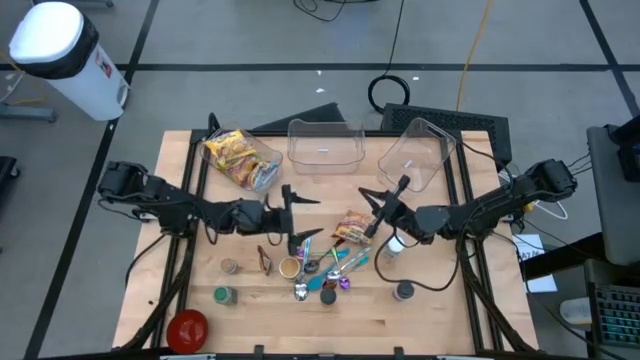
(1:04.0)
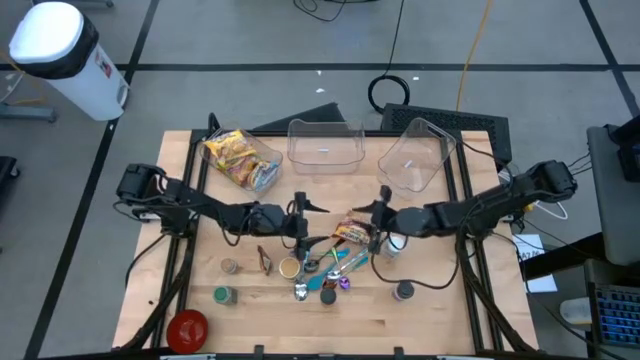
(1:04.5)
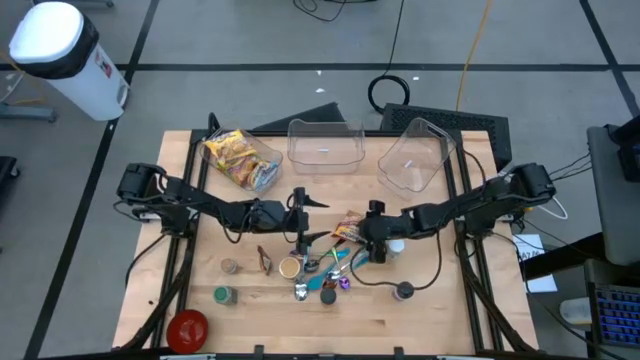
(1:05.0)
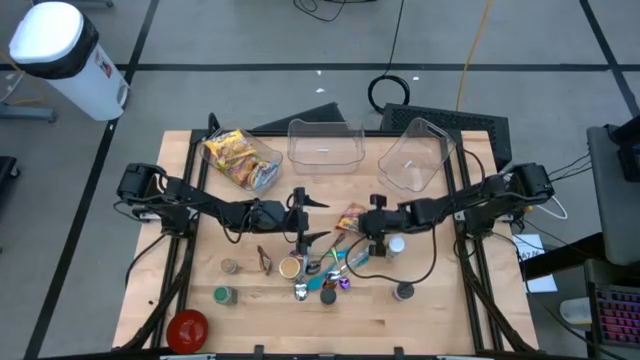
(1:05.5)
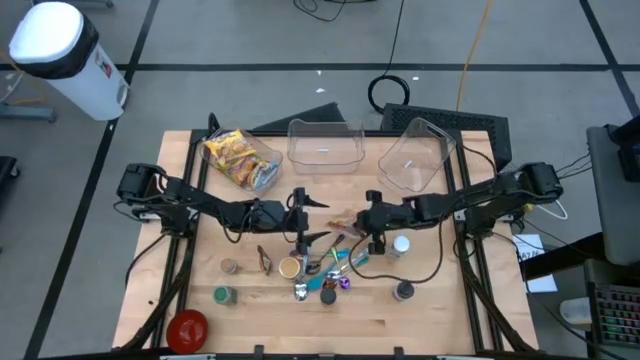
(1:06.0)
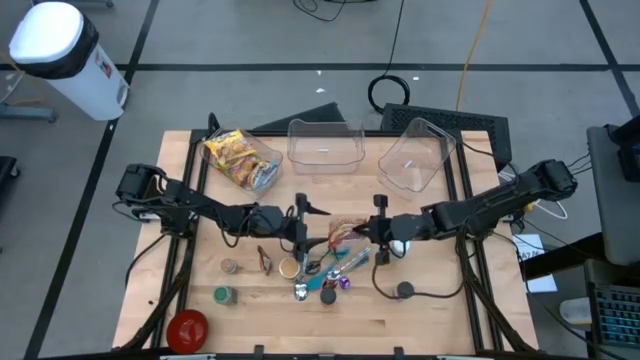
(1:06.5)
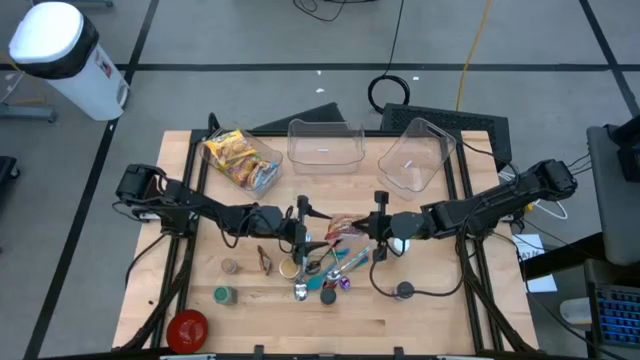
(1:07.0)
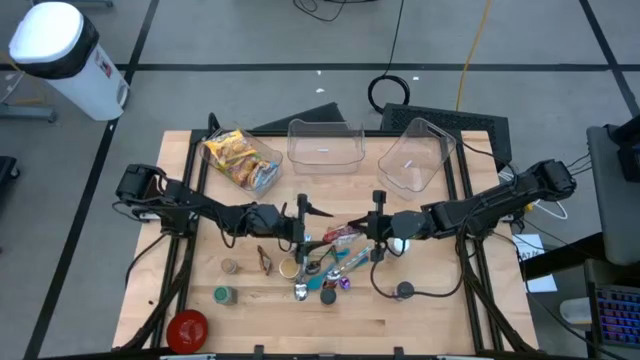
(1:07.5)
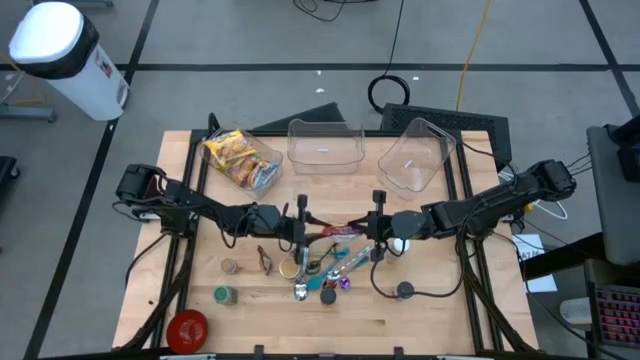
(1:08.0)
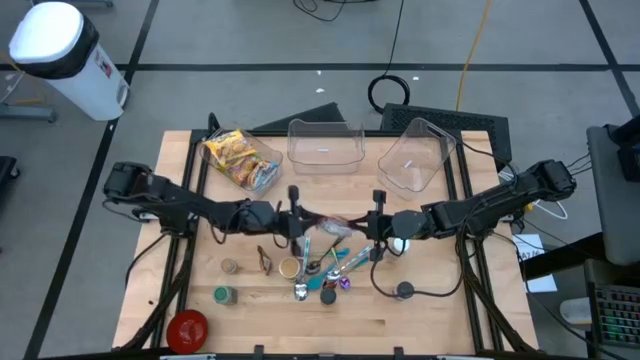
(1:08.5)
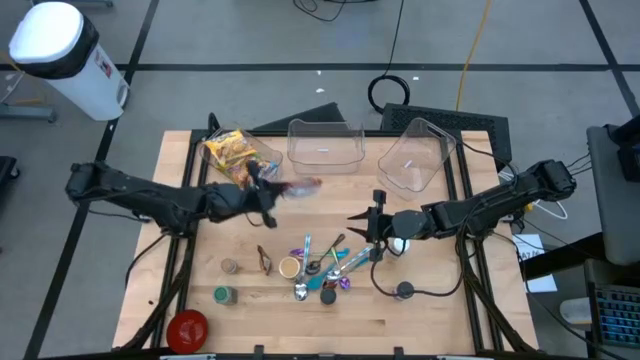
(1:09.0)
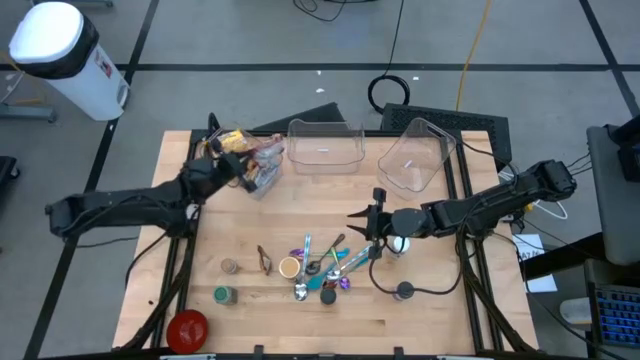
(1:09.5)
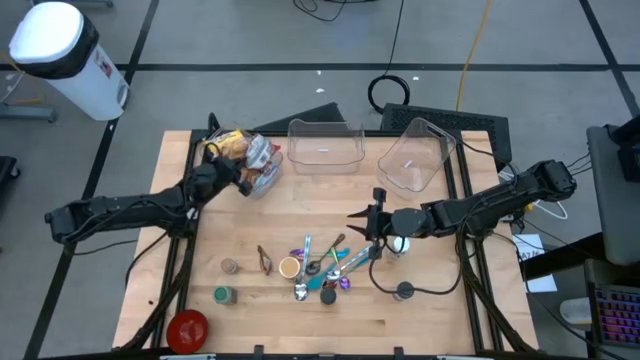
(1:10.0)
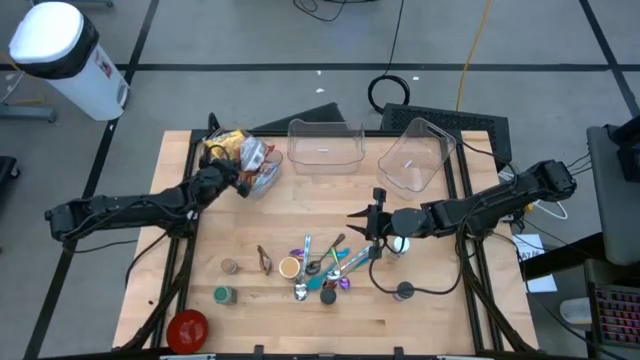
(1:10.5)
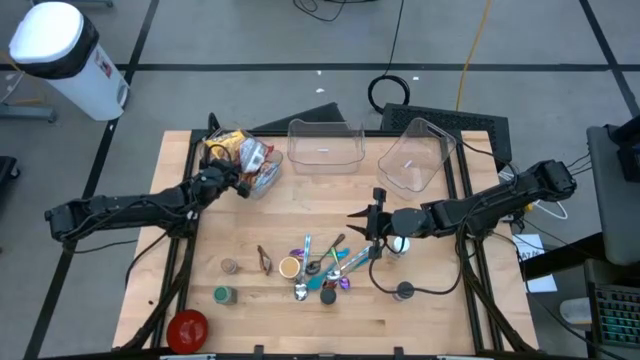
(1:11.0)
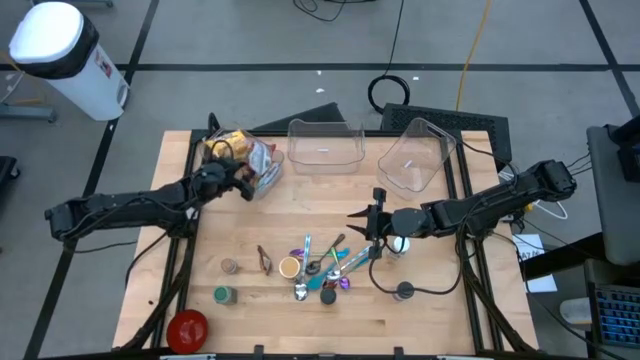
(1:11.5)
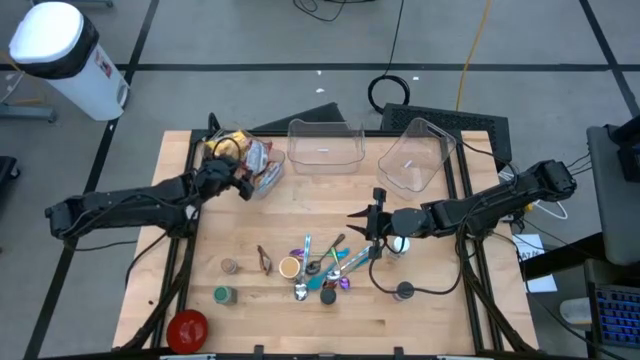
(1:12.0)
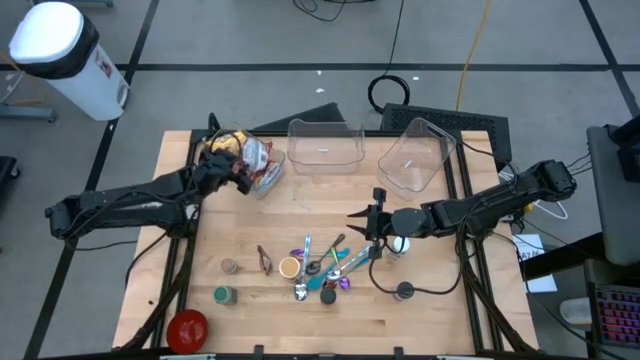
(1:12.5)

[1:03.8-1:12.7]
Task: Pick & Place Food Item
Put the red noodle pack into the left transparent bin

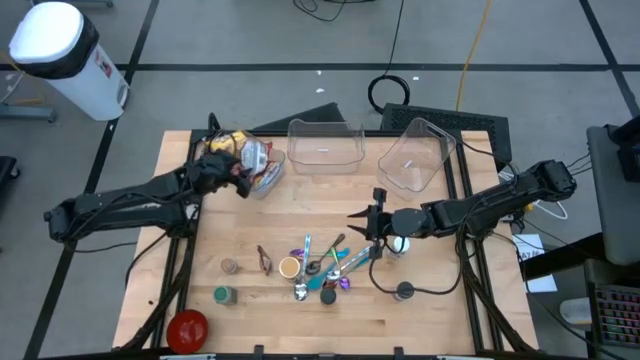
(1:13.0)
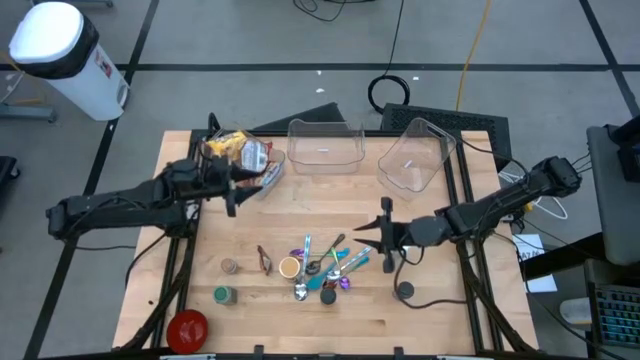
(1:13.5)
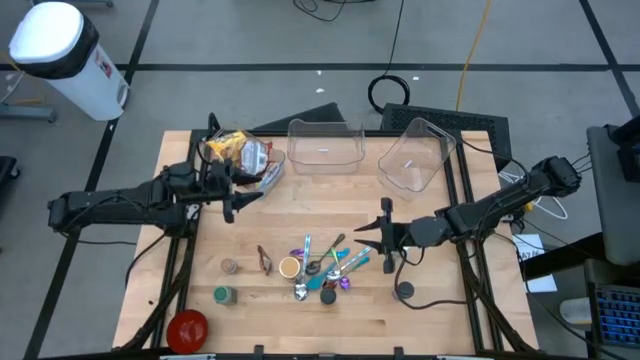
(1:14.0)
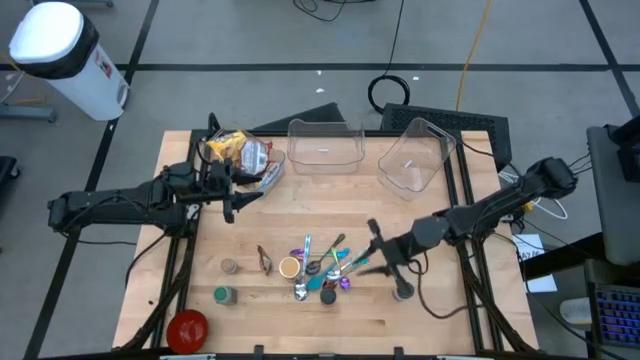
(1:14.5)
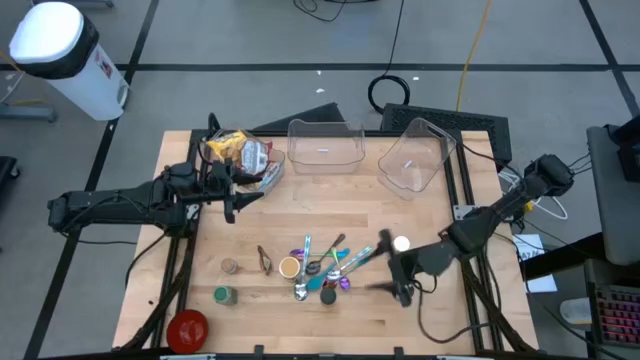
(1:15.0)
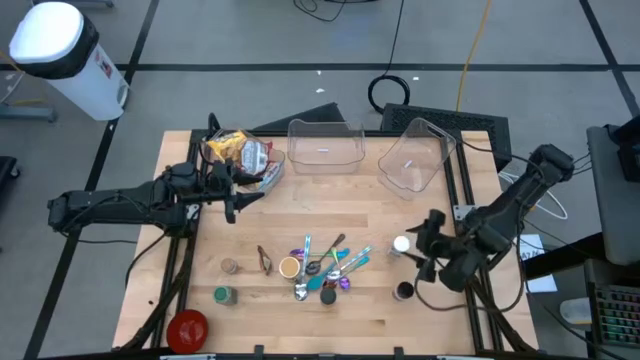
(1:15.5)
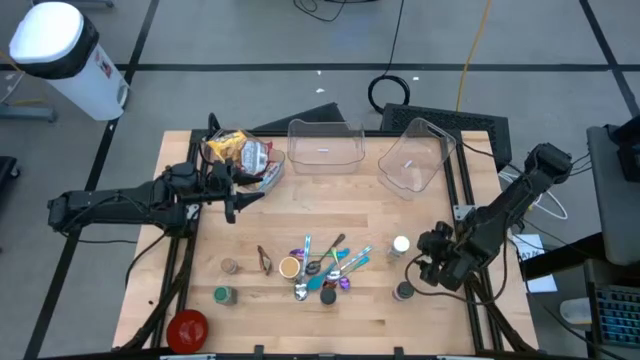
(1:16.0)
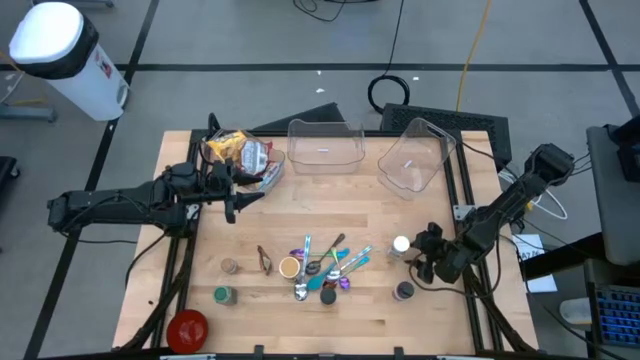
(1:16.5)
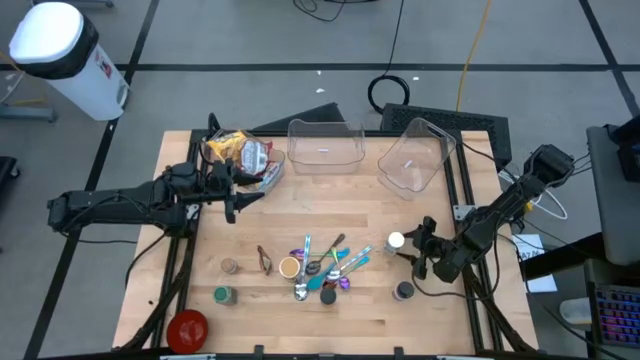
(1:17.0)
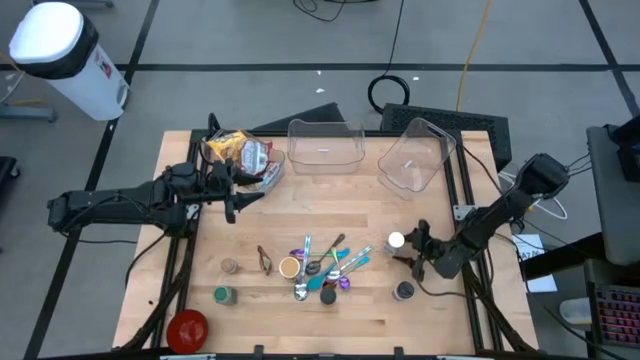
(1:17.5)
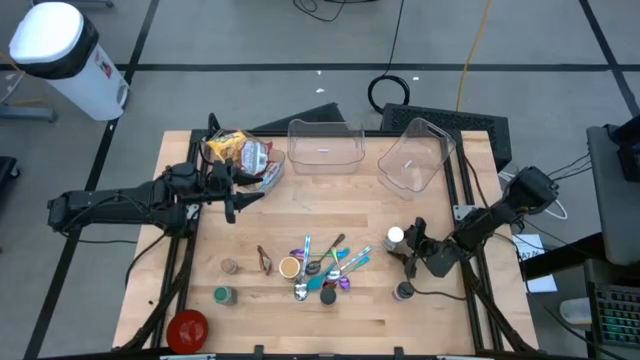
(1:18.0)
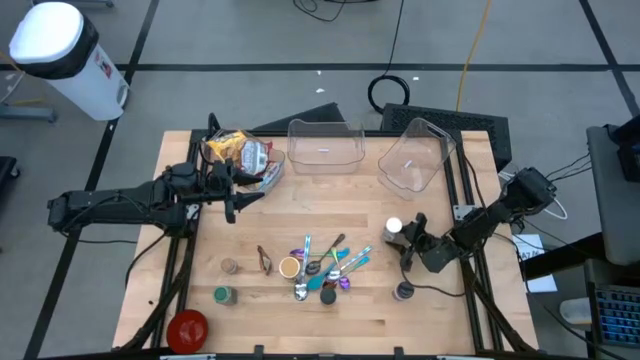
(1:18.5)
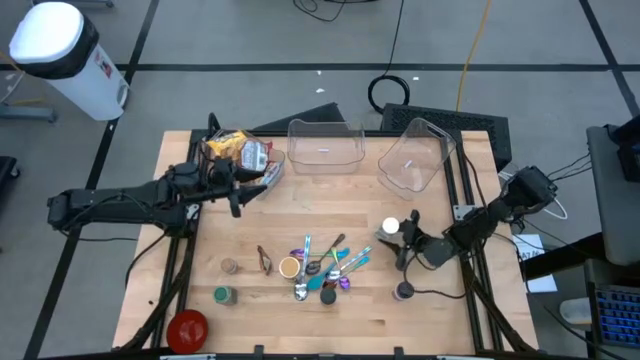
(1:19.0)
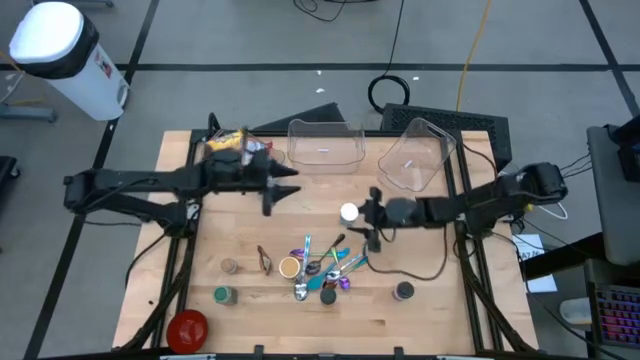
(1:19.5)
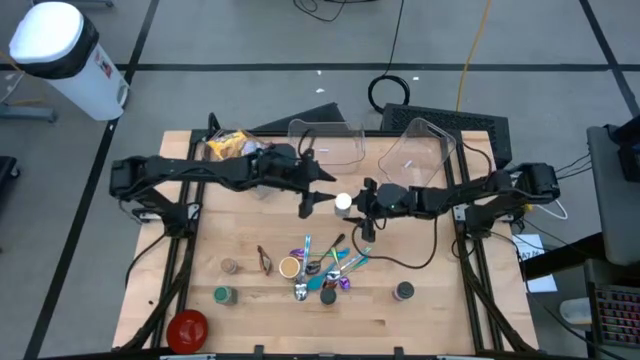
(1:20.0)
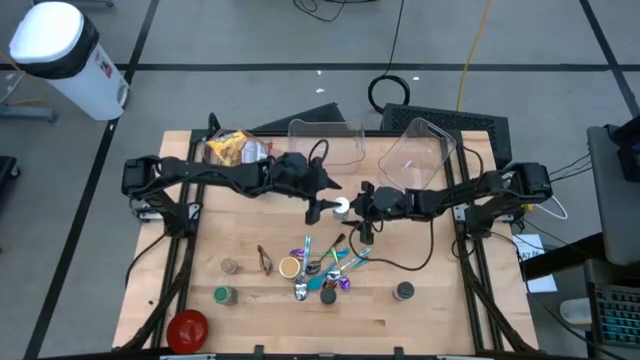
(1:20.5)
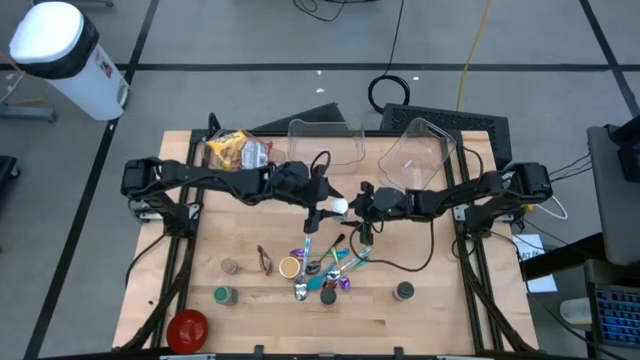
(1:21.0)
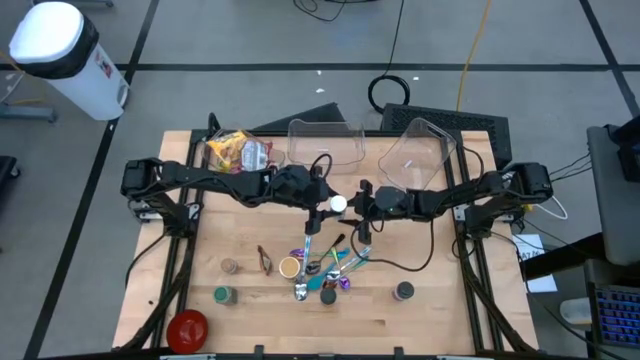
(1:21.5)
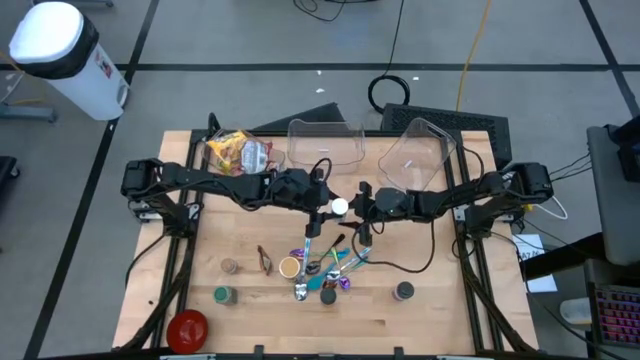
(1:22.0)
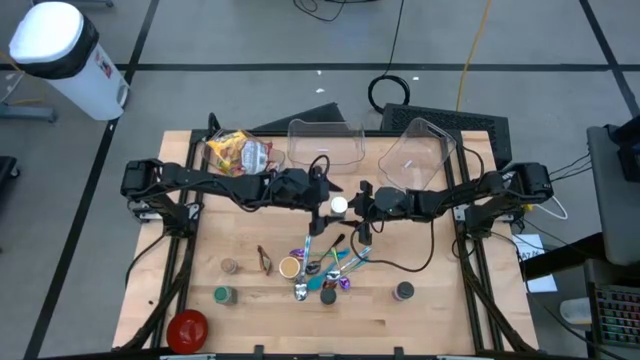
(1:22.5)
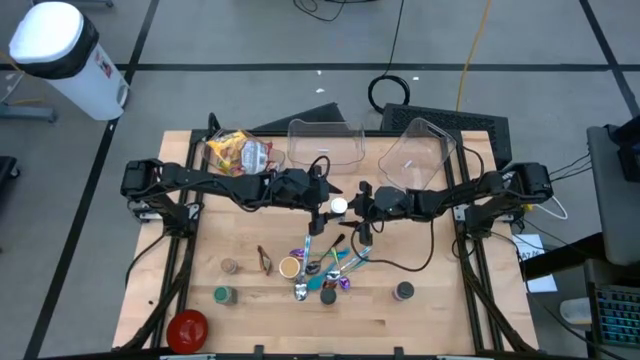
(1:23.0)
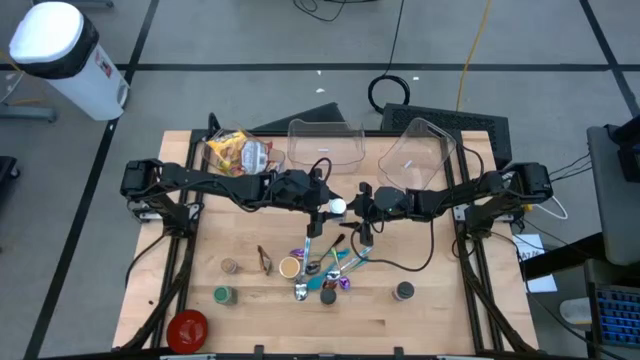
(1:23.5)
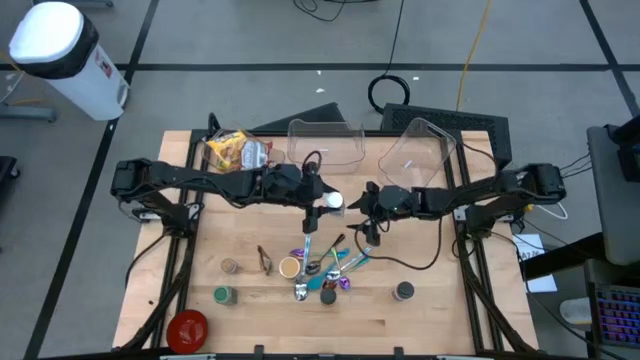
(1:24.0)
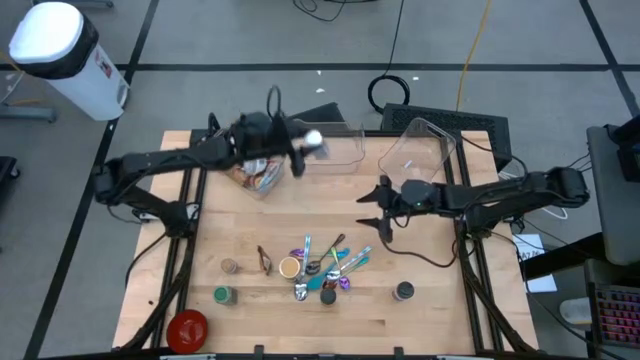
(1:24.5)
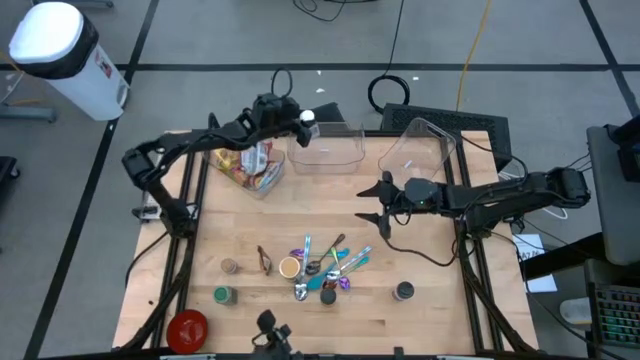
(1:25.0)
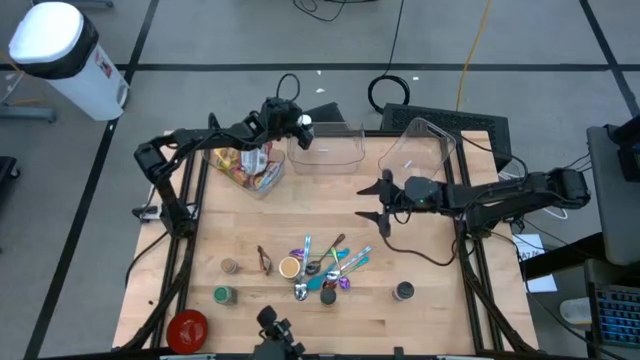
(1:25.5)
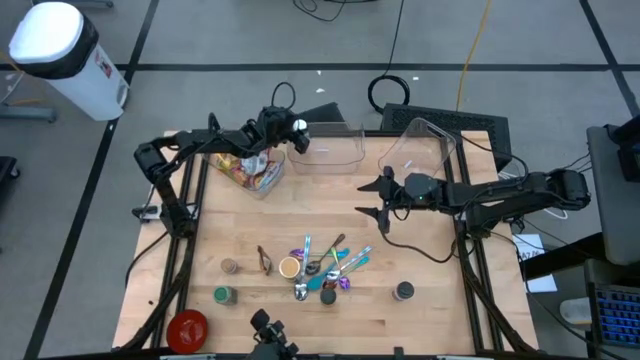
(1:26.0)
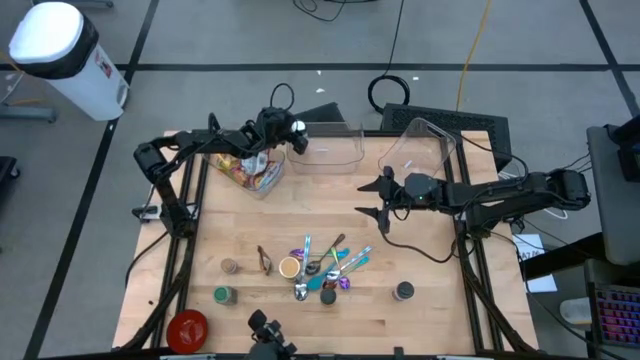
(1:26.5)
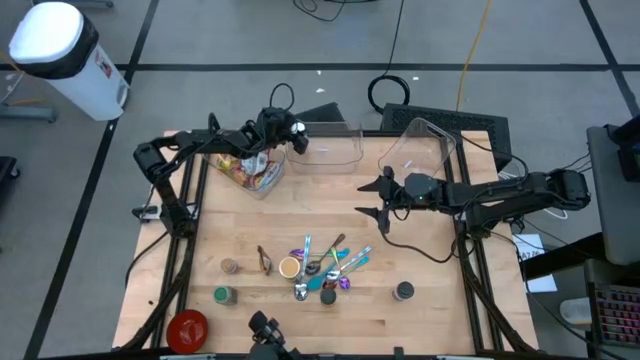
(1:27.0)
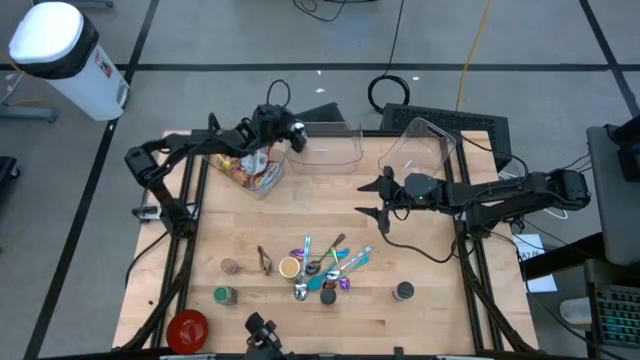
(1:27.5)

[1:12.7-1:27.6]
Put the white seasoning bottle into the middle transparent bin
